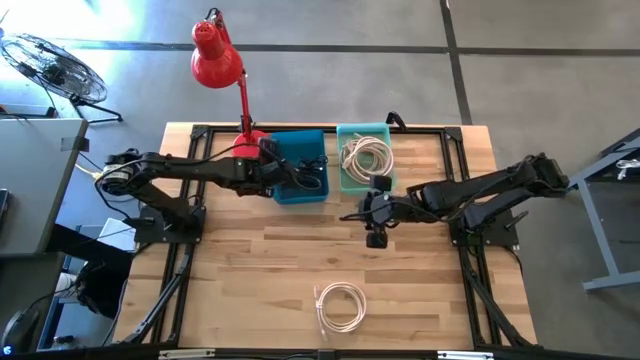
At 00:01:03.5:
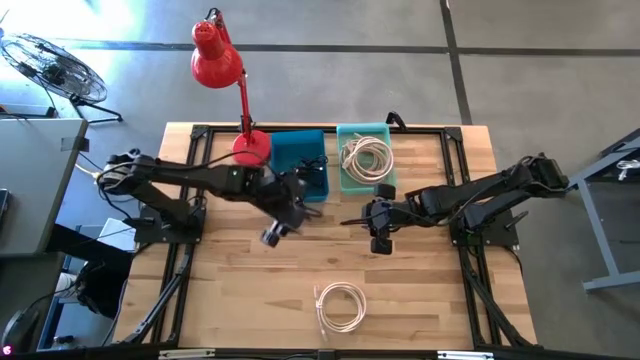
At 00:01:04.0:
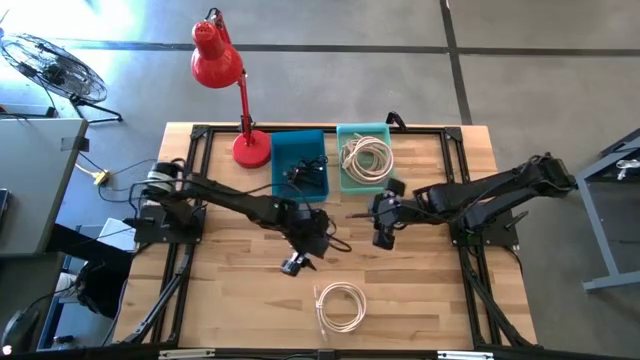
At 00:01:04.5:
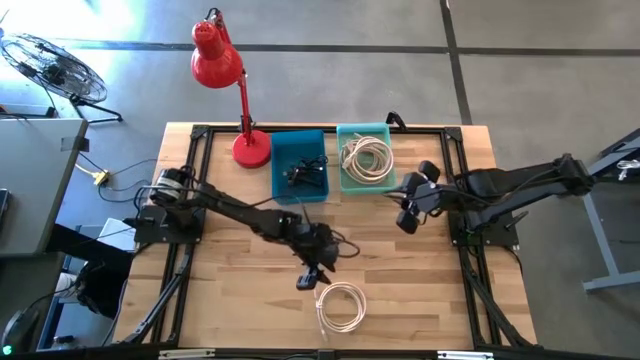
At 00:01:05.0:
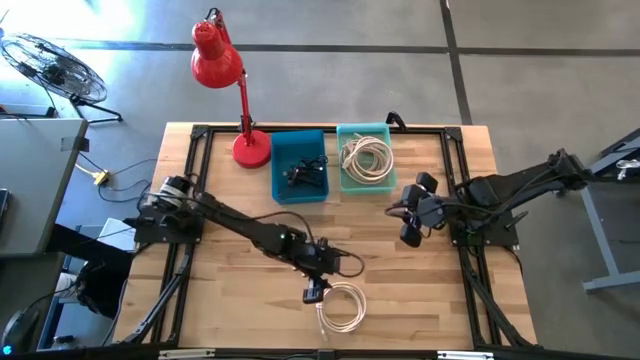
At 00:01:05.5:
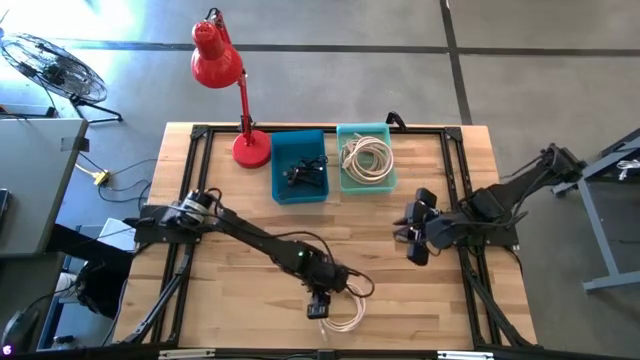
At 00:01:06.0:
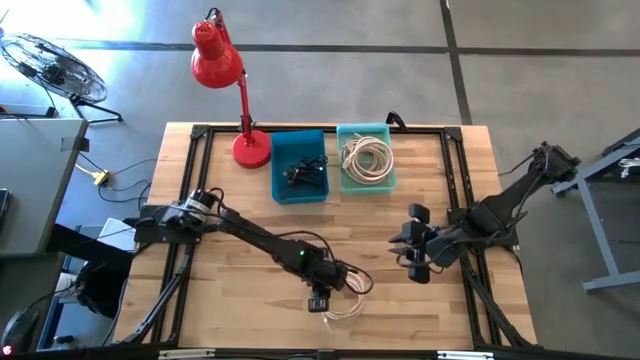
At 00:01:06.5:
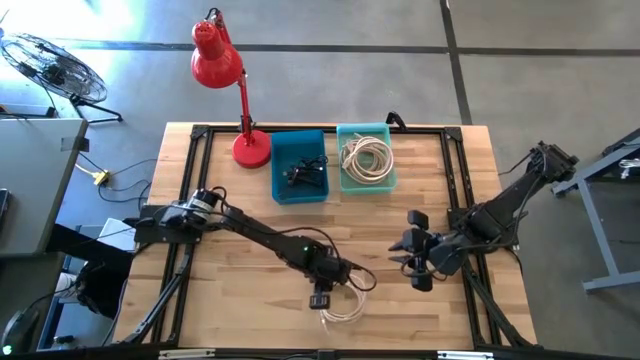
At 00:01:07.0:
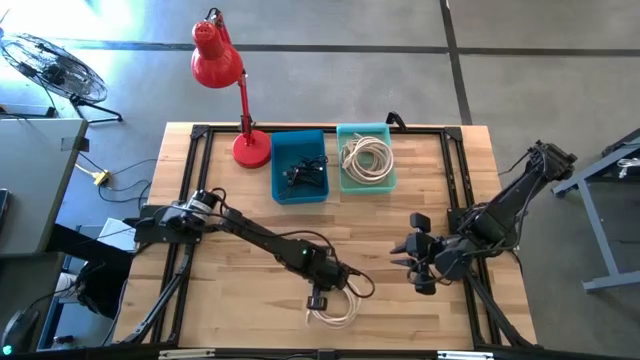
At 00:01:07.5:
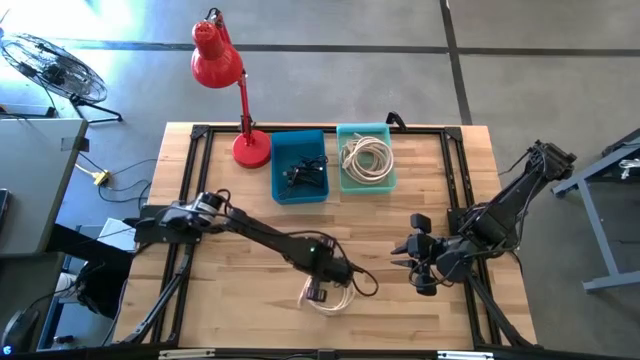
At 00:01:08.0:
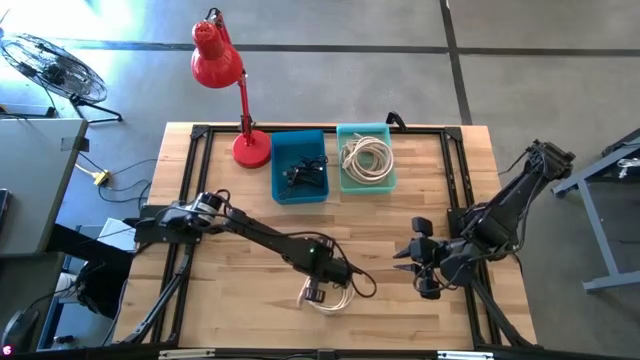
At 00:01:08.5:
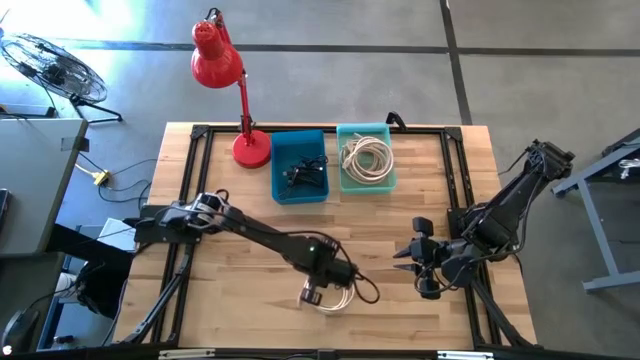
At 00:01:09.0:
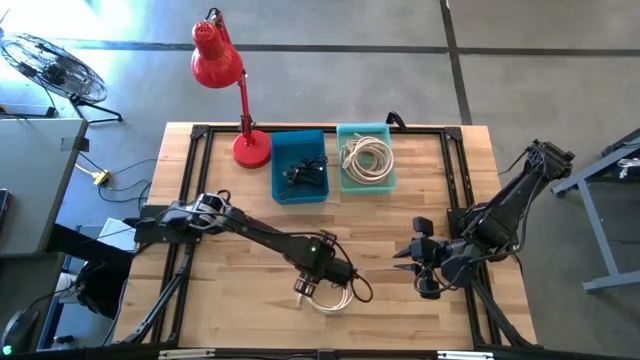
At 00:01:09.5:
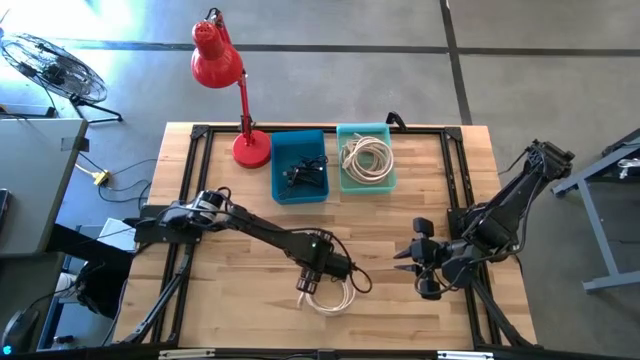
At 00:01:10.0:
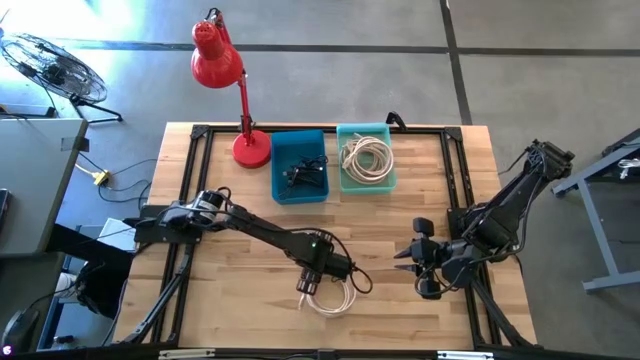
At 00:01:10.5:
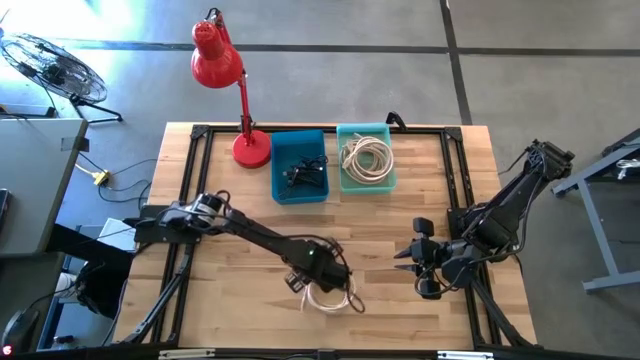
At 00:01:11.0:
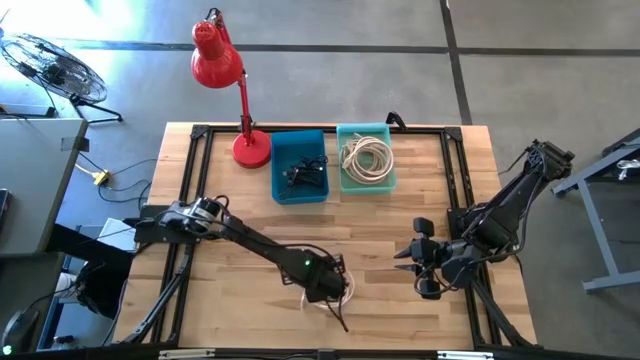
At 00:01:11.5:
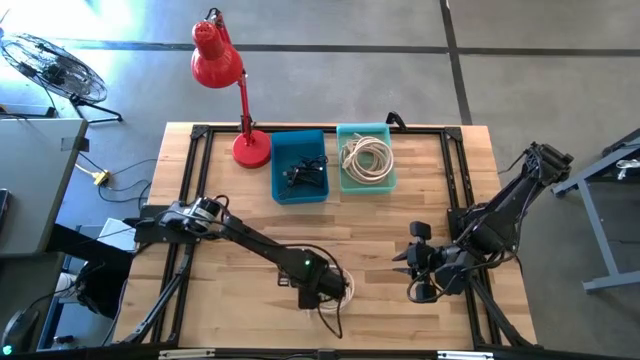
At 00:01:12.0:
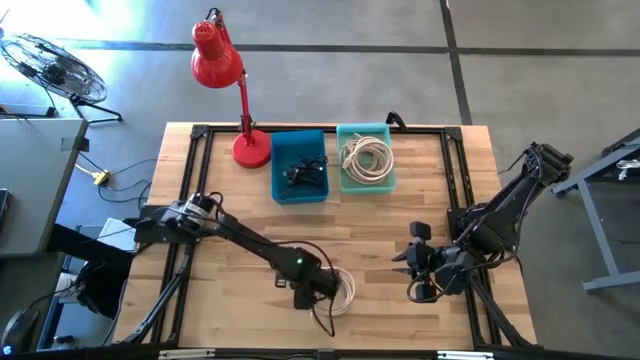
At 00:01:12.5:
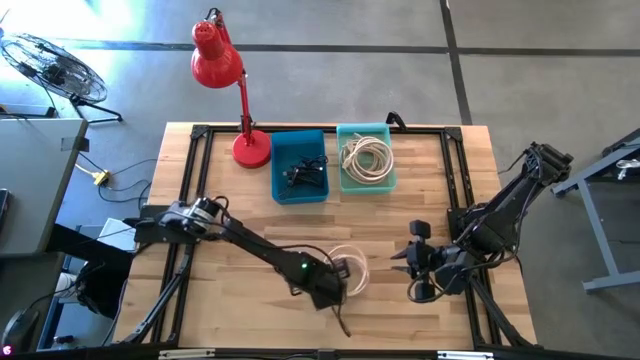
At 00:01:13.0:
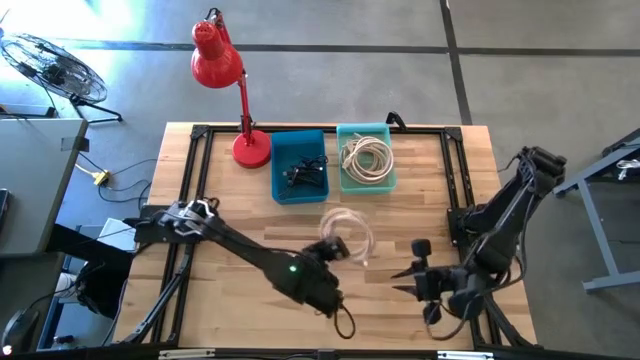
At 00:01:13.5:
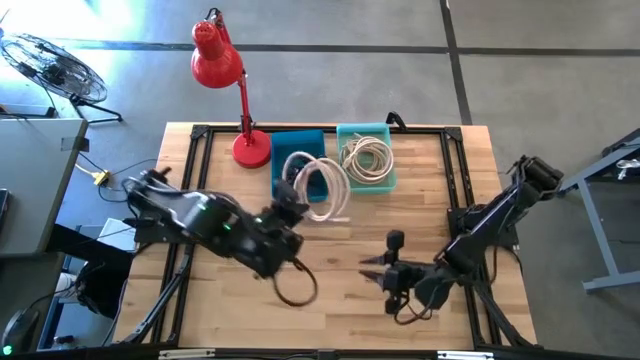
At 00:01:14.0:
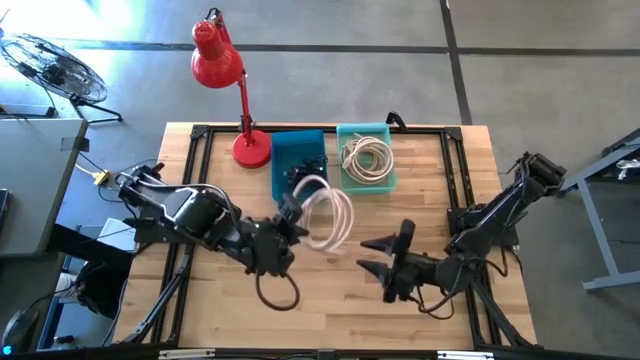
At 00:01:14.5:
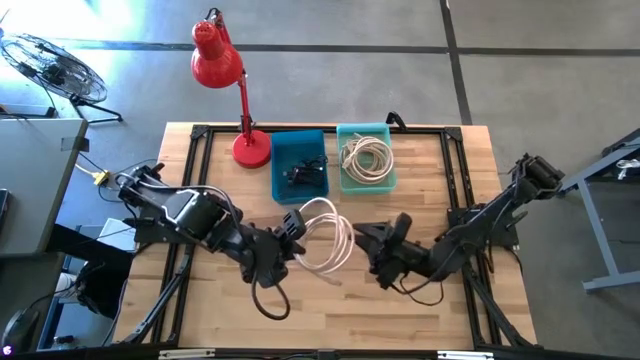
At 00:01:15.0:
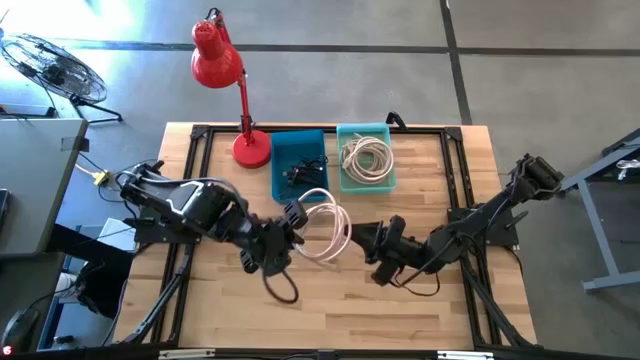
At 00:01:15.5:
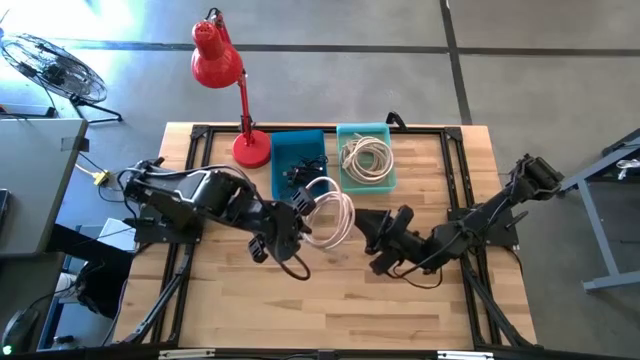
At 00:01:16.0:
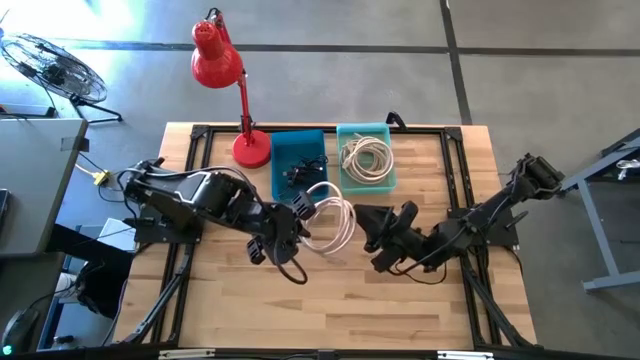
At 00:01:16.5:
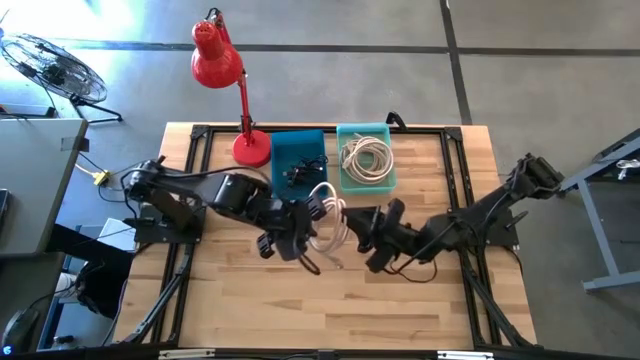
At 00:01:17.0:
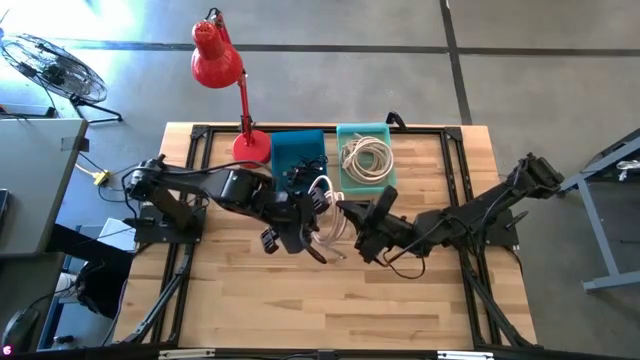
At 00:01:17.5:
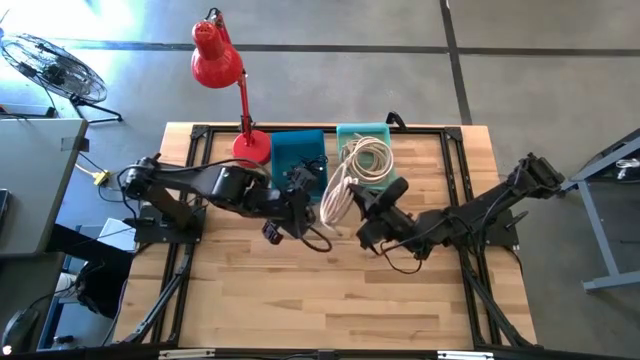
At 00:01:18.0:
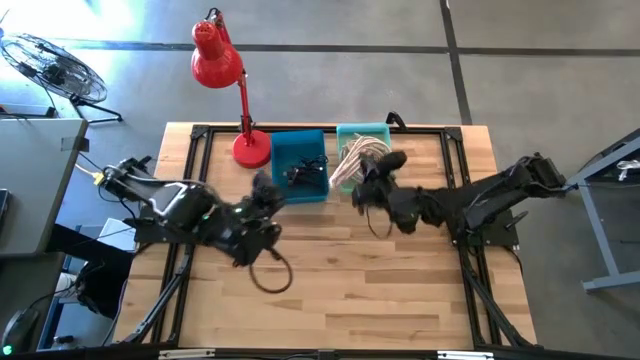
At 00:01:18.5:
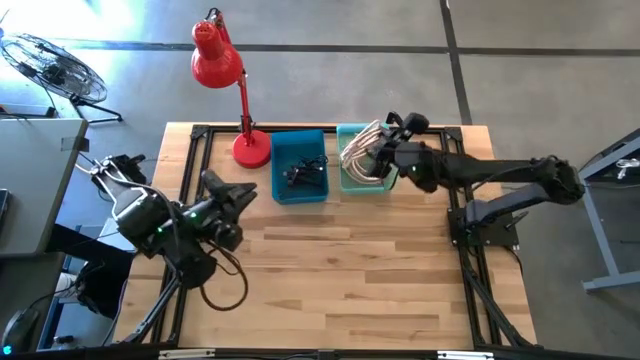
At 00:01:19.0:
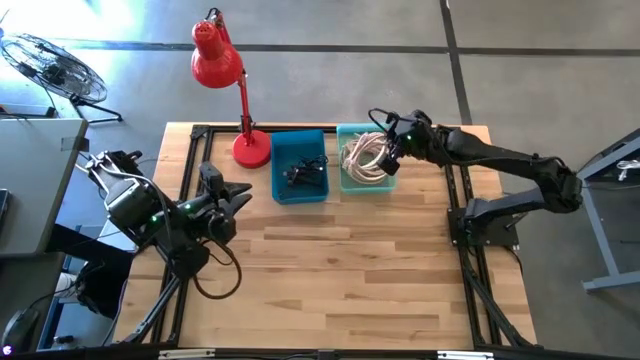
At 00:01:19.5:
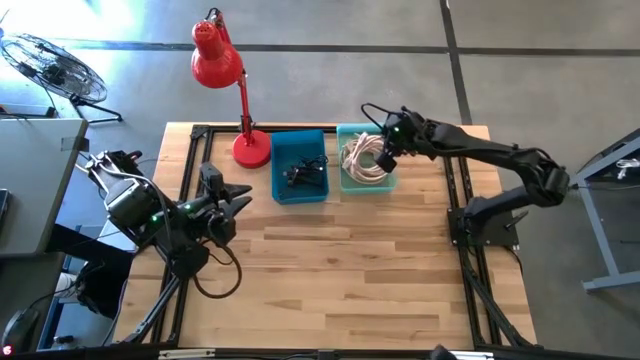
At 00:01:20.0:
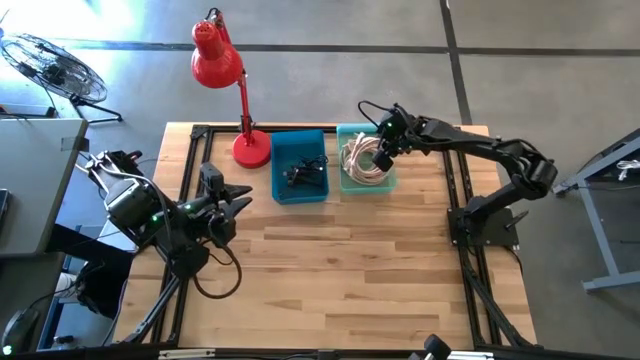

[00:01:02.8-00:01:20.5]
Task: Pick & Place USB Port
Put the white hdmi cable into the green bin

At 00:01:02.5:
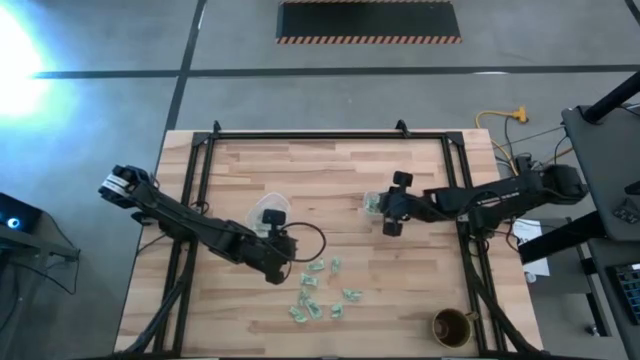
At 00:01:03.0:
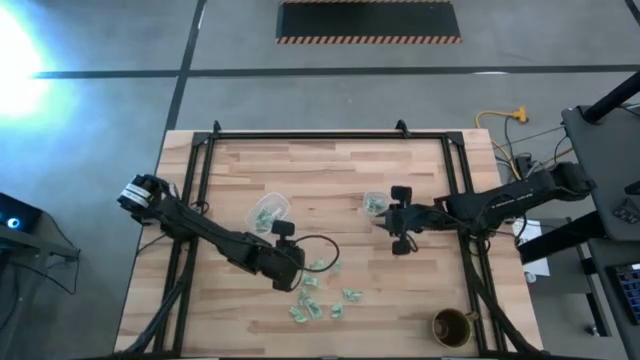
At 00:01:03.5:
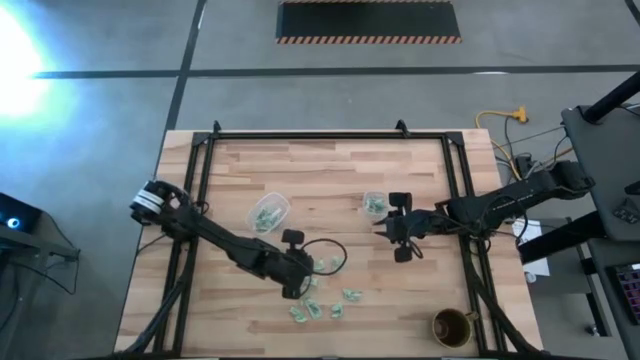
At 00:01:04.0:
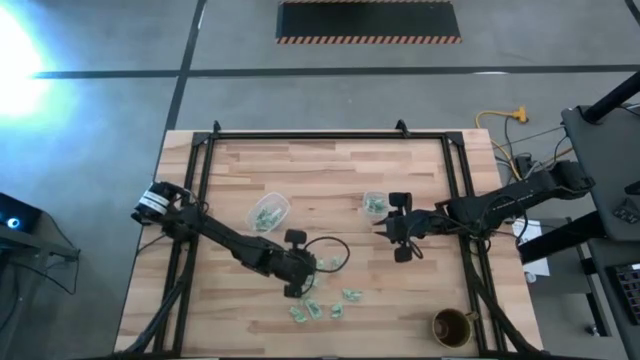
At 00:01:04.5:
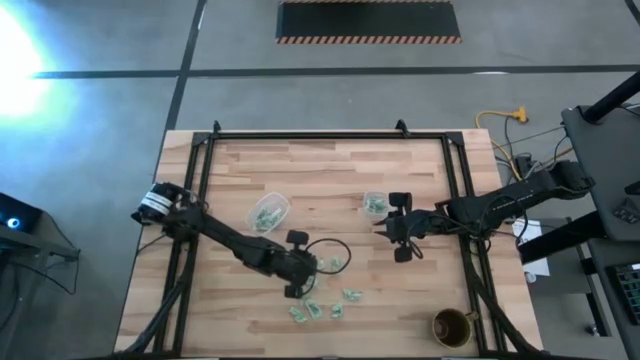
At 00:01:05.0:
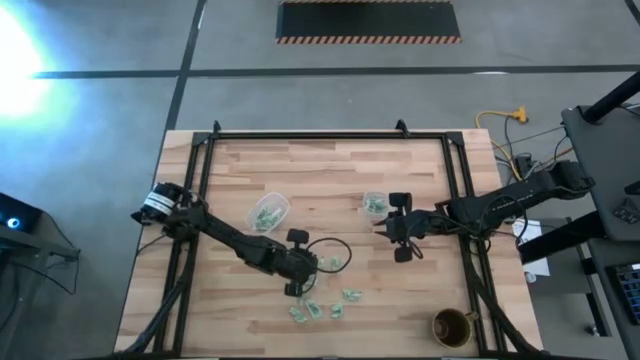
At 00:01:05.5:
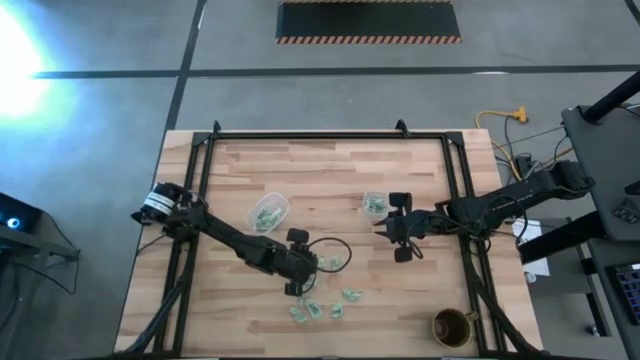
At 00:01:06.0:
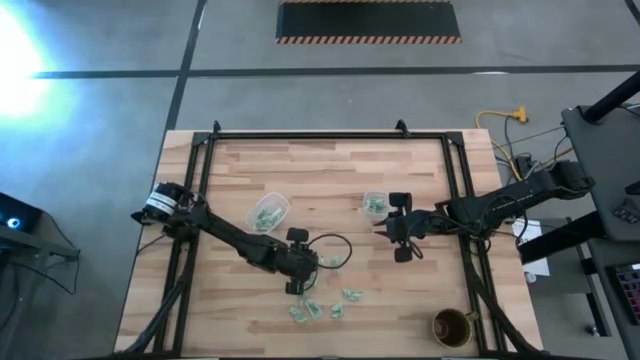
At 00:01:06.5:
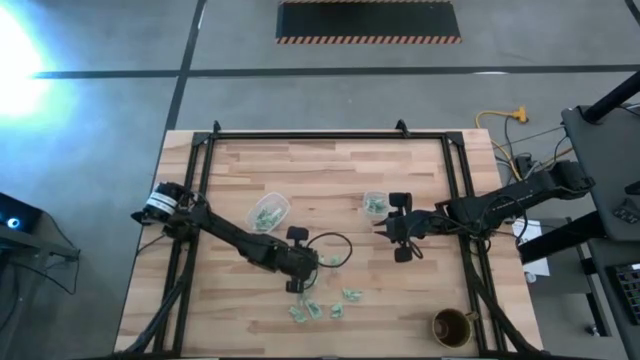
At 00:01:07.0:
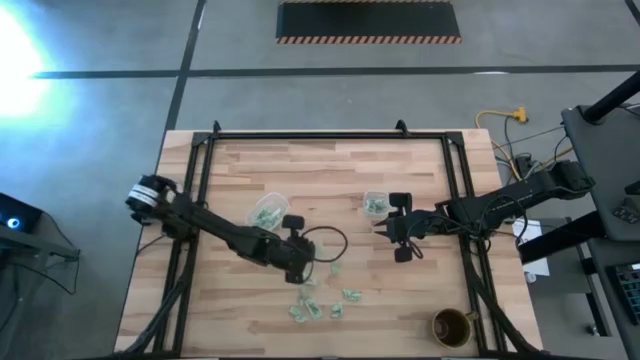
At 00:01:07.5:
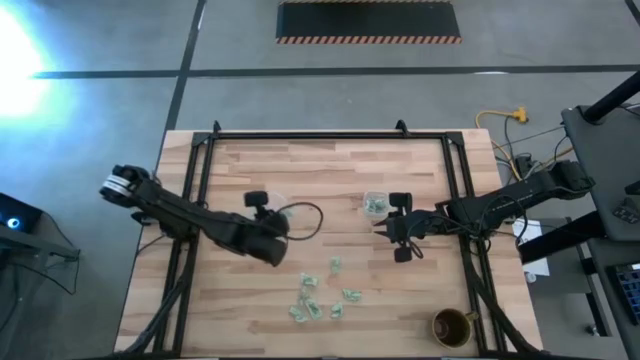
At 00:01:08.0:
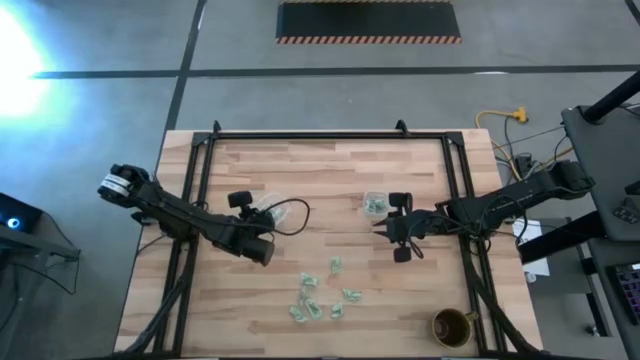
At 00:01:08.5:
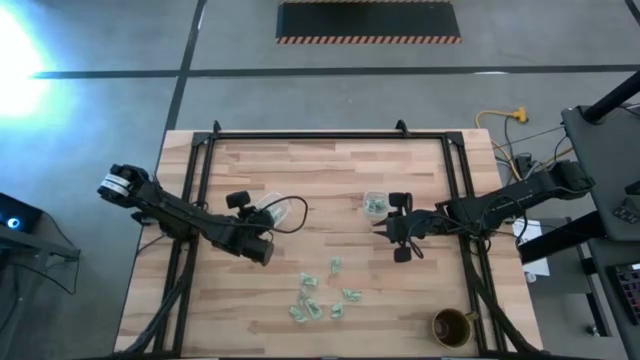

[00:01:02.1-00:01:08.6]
Task: Pick and place Stevia / Truvia into bins
Put the light green stevia packet into the left transparent container
